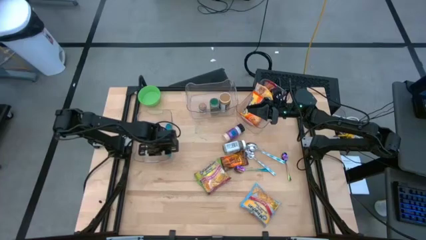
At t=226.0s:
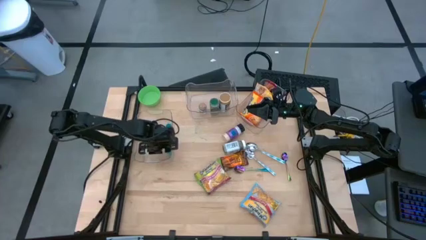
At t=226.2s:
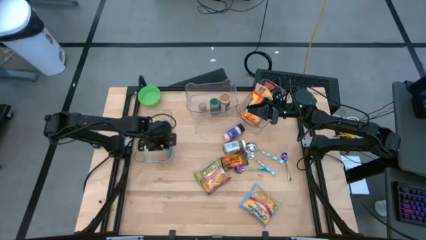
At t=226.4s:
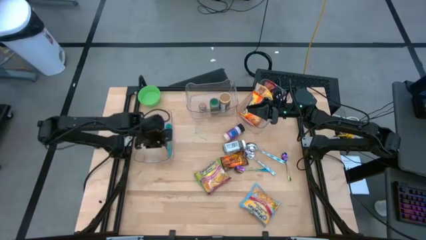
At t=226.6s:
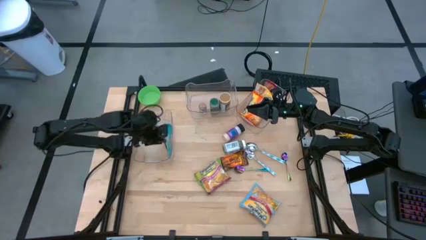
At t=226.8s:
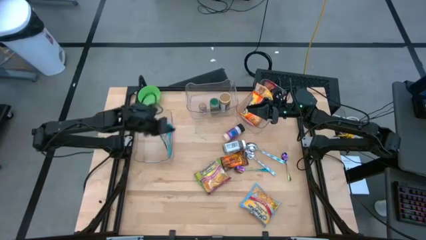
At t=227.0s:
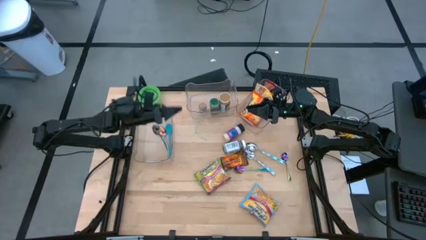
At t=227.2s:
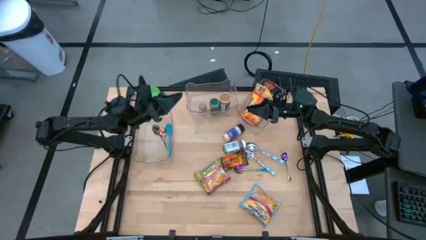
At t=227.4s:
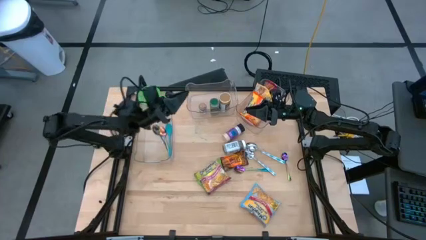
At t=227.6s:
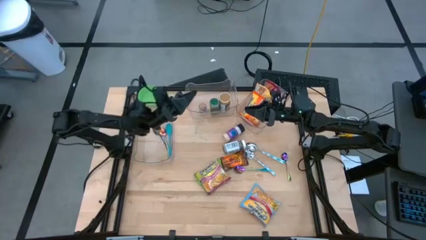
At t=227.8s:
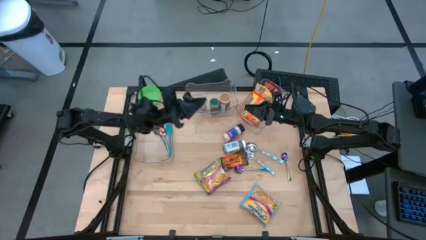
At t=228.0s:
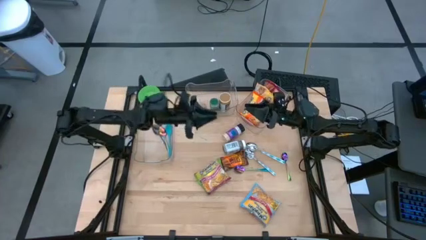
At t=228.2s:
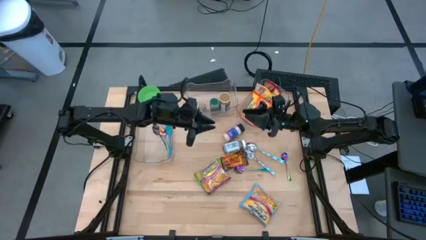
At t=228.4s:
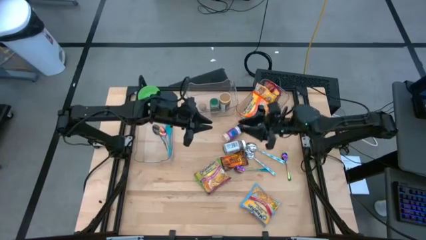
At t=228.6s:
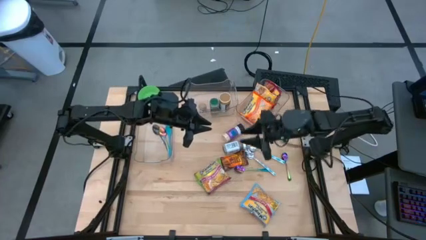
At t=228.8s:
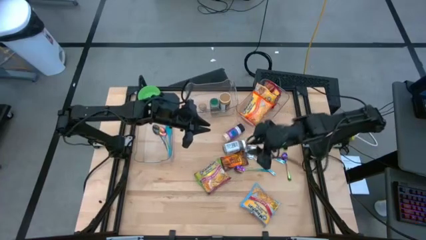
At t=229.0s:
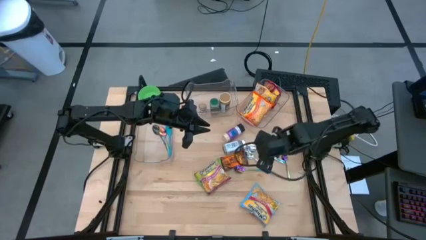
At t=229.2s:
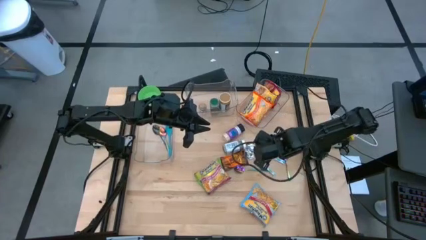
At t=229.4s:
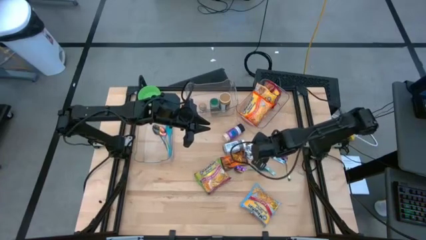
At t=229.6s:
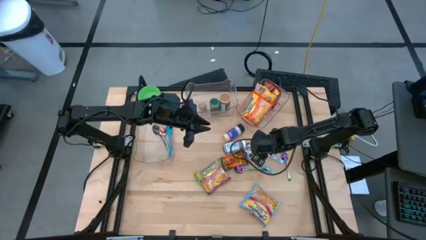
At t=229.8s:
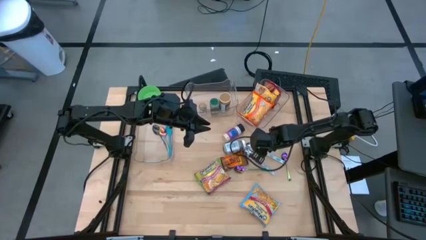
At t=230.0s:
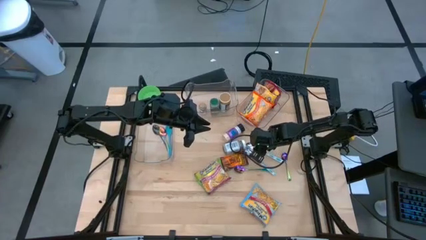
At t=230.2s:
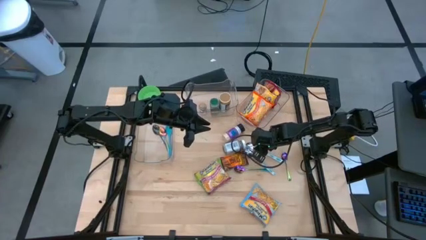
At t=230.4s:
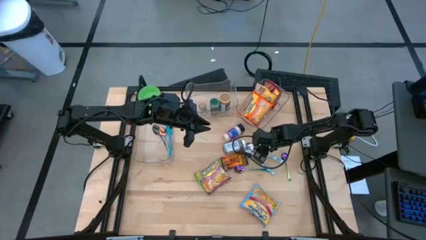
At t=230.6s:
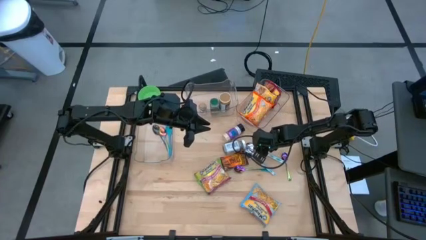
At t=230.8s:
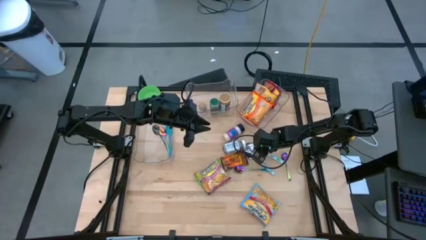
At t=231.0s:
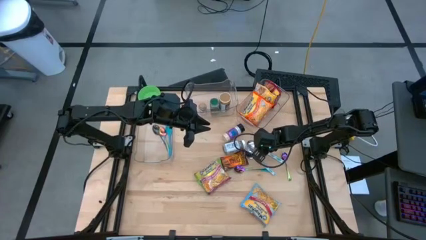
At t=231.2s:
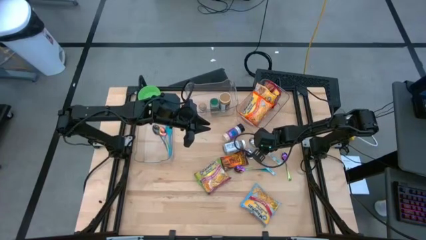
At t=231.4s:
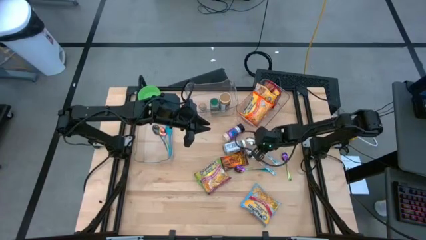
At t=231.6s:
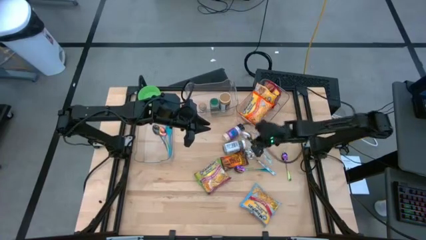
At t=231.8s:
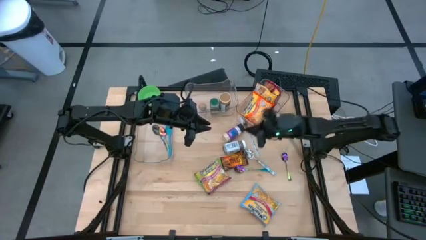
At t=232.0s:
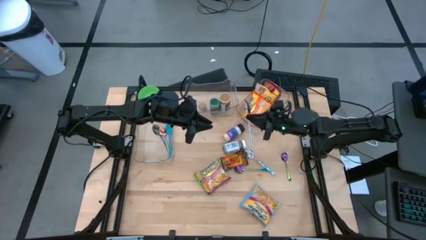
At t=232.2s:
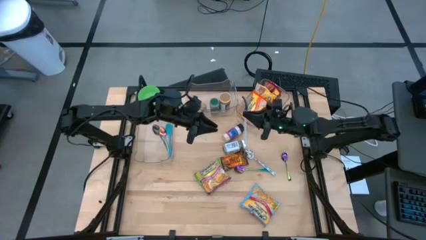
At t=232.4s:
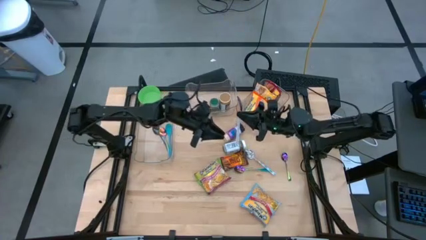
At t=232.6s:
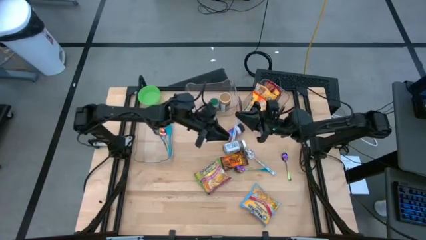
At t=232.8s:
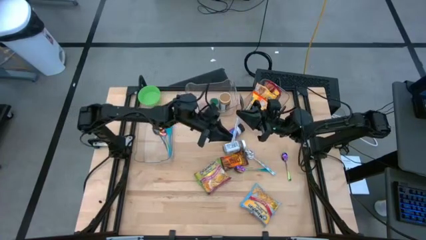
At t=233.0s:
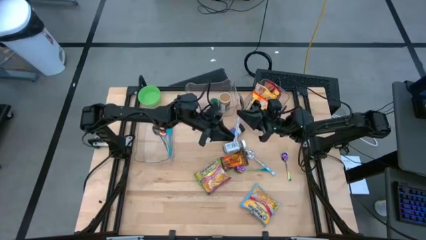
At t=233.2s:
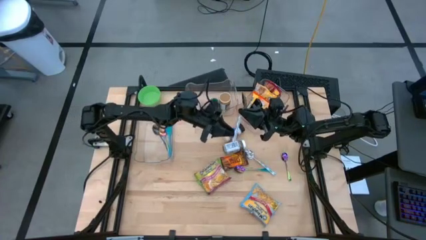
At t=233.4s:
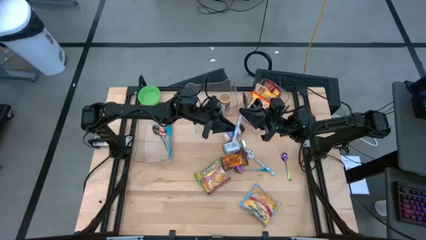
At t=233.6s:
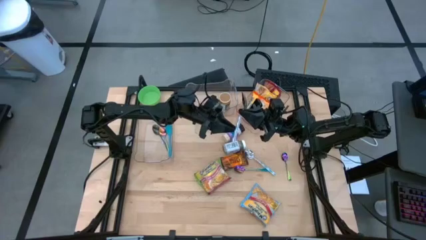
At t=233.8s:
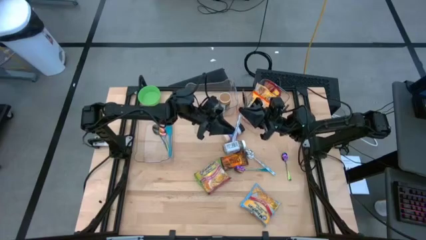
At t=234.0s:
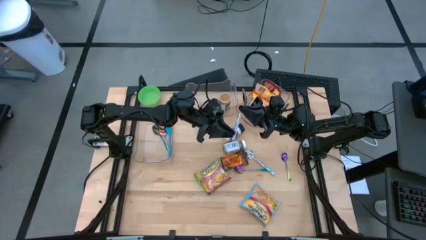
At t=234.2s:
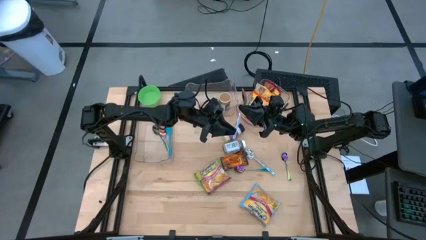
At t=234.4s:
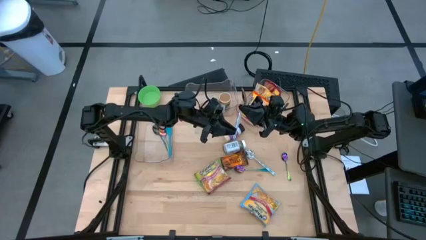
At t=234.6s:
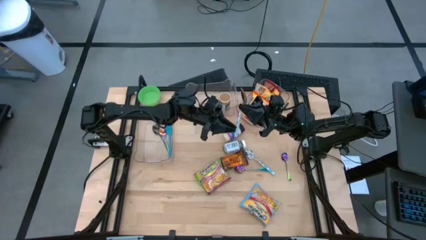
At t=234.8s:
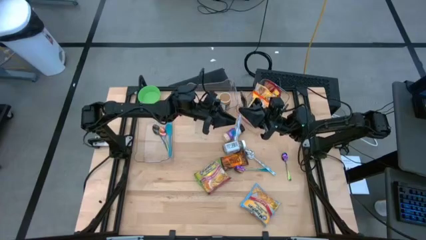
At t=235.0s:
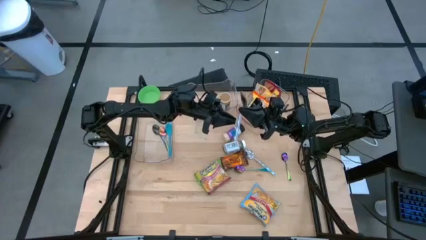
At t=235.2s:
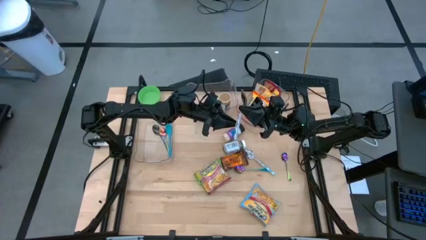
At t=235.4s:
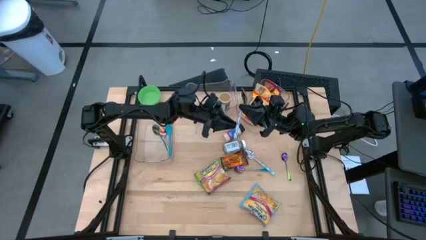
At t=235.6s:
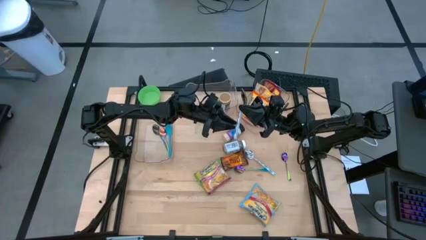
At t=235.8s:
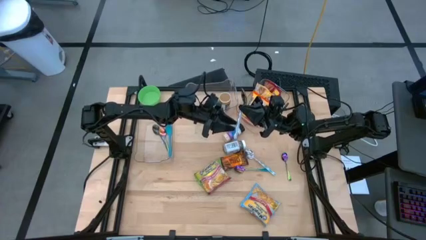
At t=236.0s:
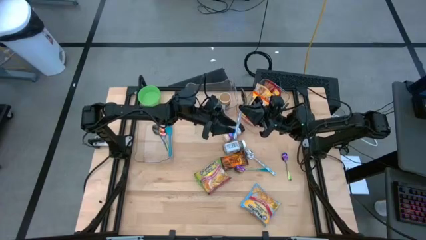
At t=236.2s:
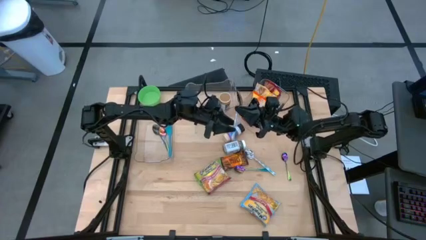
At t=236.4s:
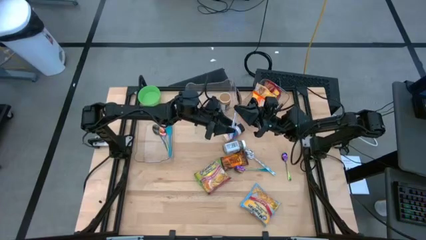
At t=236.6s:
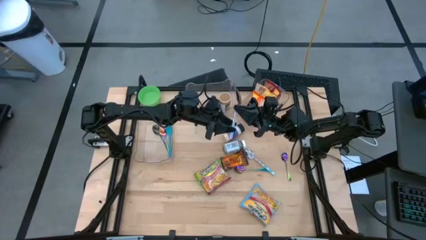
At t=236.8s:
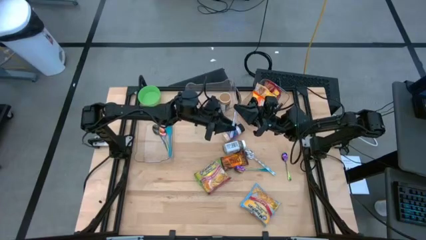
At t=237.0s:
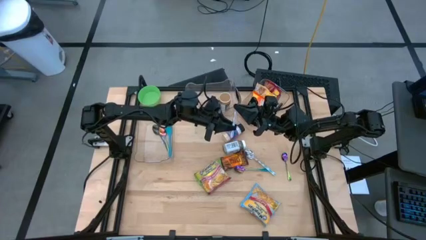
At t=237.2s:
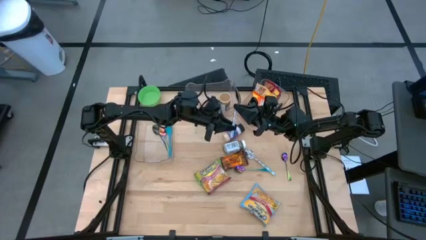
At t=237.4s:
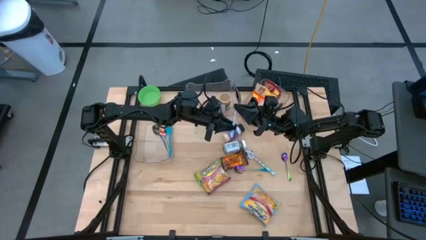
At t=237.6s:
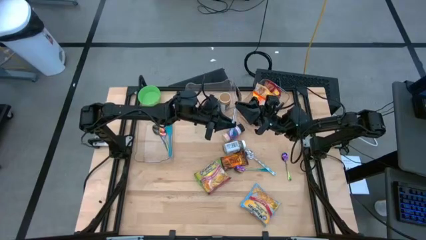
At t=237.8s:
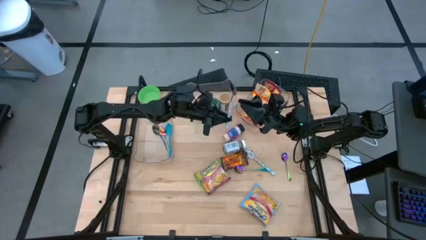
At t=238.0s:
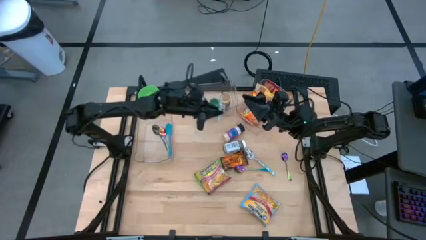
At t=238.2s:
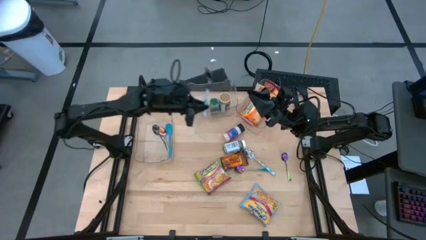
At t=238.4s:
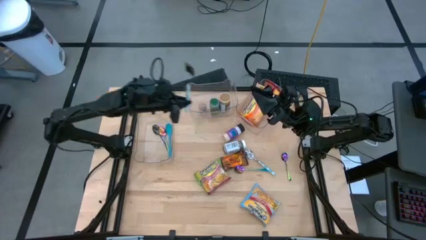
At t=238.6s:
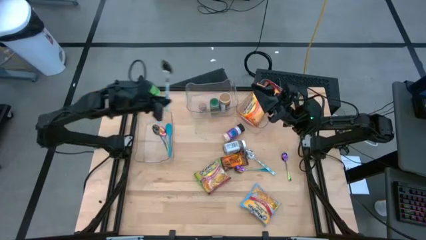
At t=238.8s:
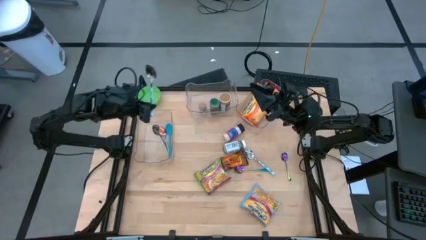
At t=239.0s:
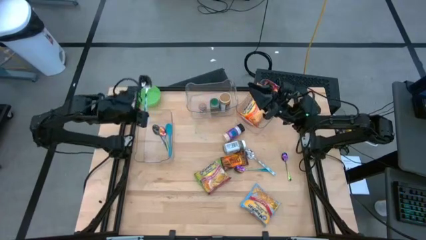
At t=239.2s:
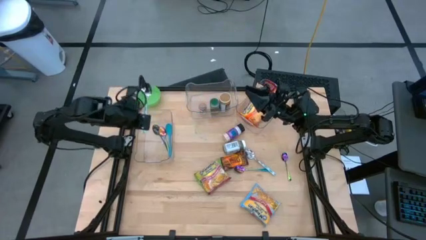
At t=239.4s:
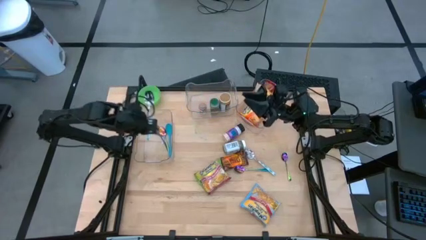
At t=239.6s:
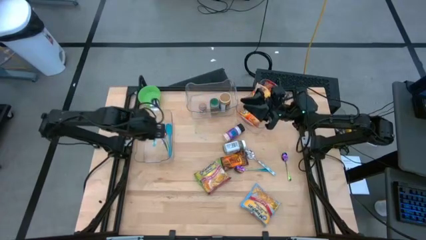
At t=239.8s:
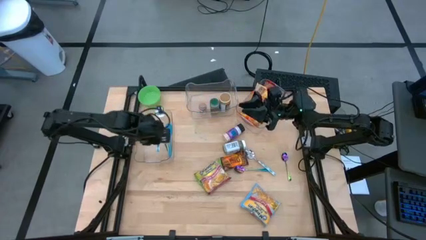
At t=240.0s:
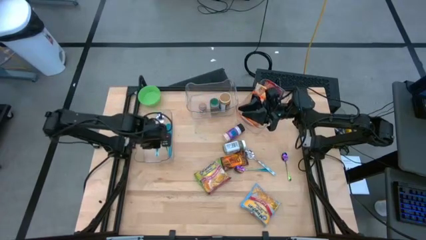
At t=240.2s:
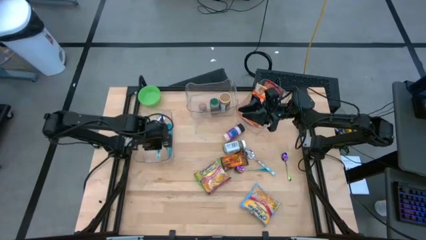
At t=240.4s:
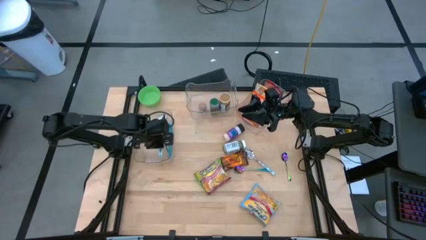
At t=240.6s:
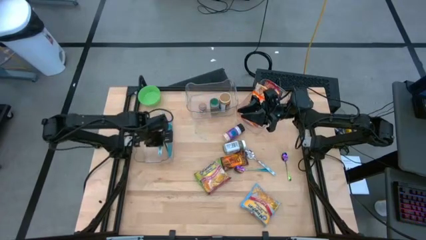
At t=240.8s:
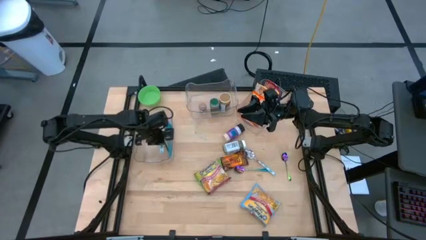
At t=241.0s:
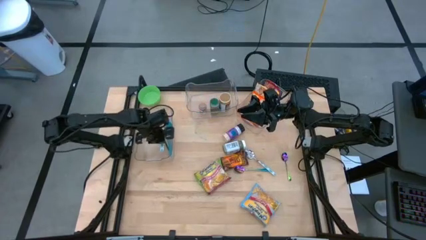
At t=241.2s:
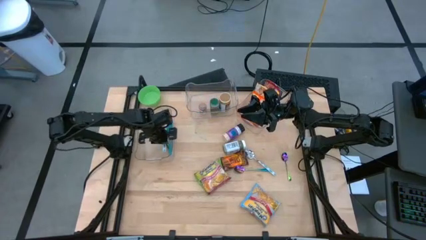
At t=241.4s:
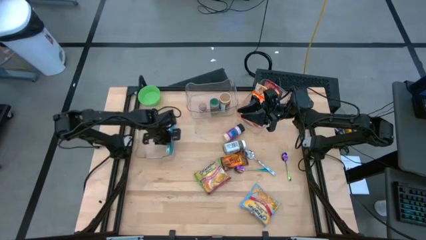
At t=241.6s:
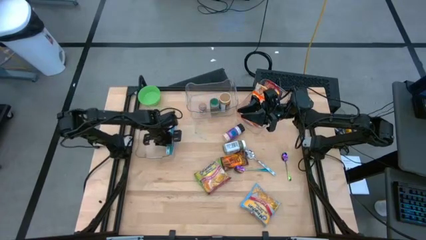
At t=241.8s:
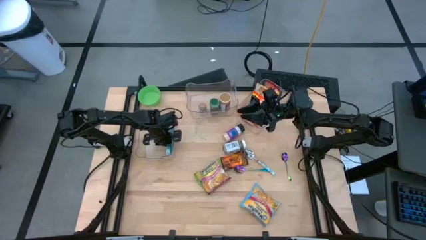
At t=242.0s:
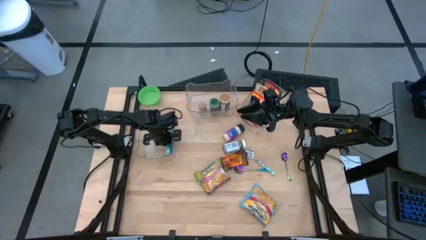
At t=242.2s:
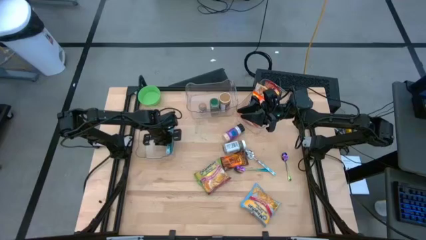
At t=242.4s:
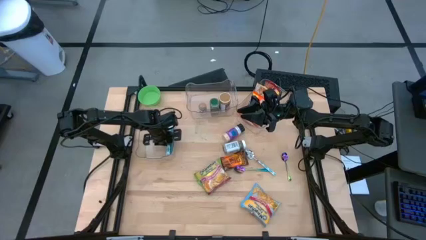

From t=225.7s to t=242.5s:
Task: Pick & Place Food Item
Put the top white patterned spoon into the left transparent bin
